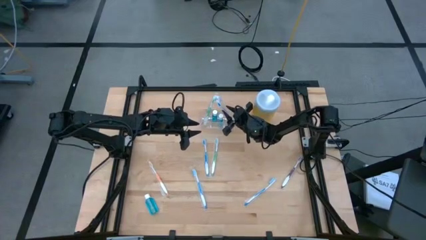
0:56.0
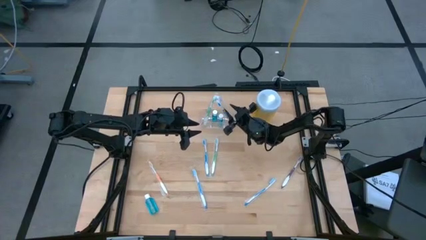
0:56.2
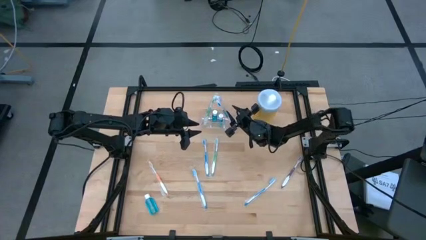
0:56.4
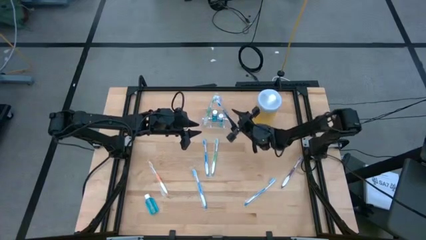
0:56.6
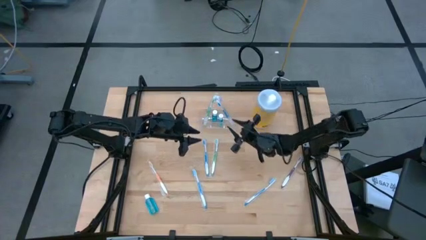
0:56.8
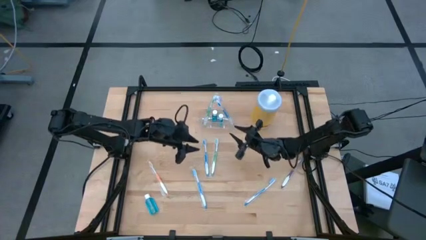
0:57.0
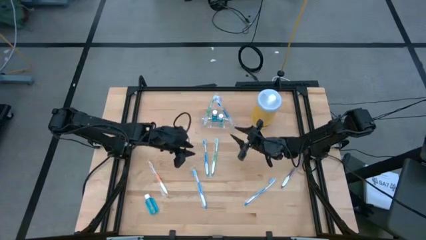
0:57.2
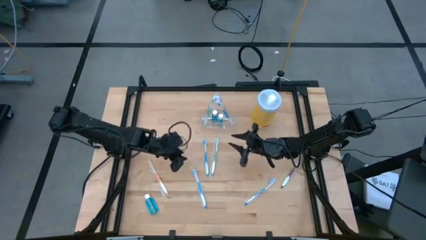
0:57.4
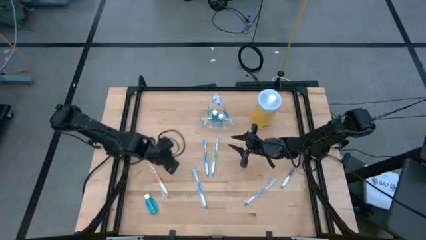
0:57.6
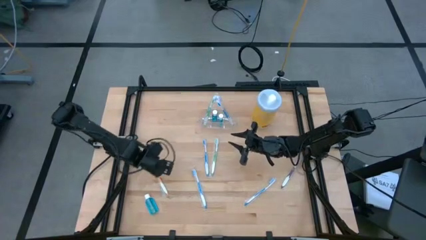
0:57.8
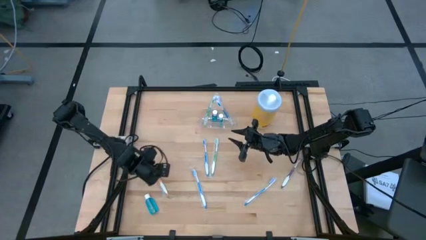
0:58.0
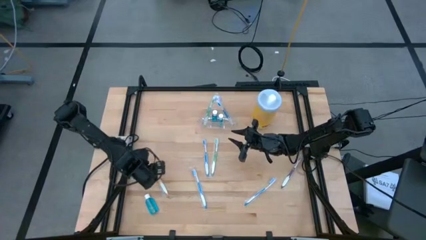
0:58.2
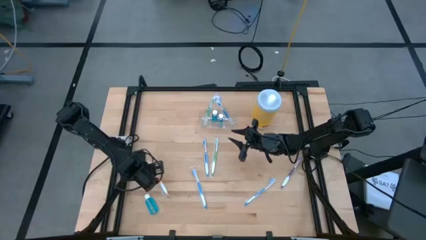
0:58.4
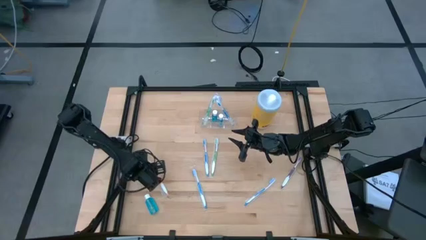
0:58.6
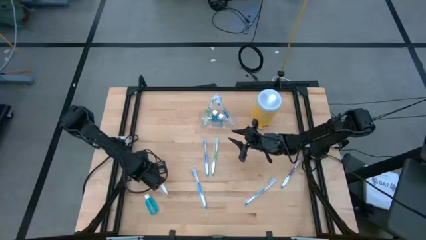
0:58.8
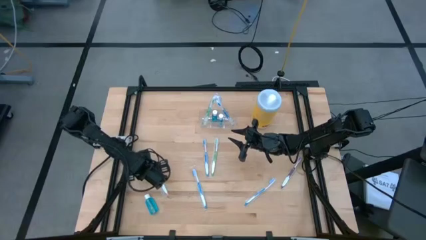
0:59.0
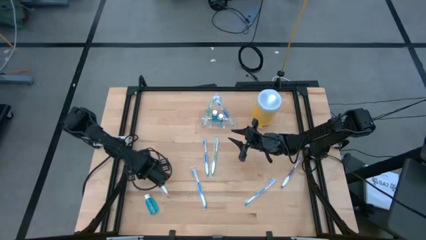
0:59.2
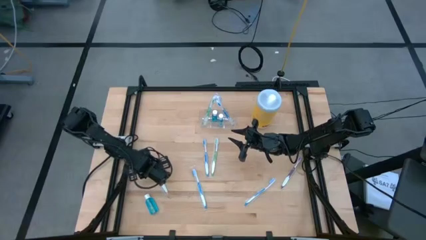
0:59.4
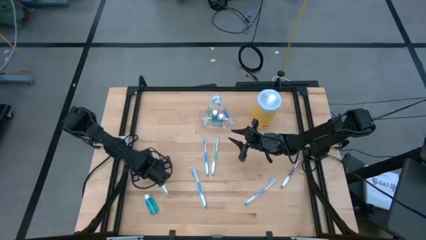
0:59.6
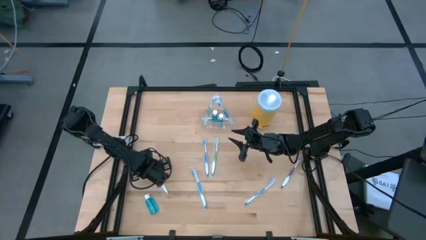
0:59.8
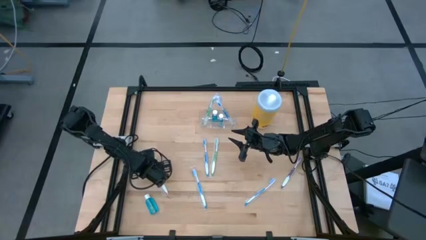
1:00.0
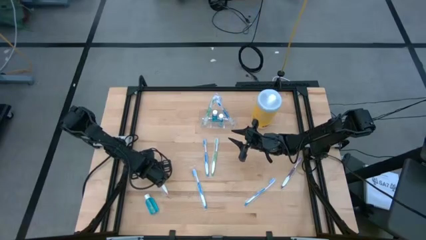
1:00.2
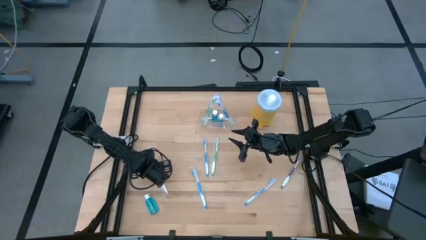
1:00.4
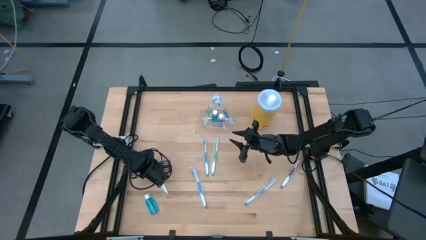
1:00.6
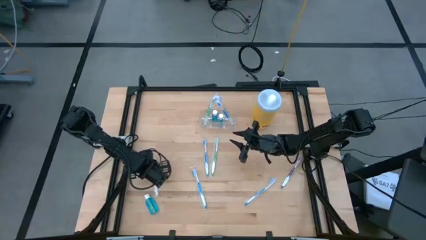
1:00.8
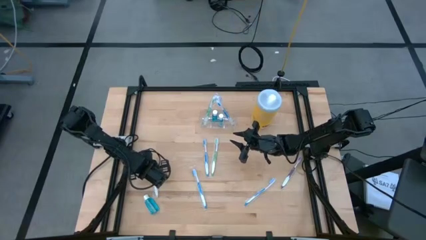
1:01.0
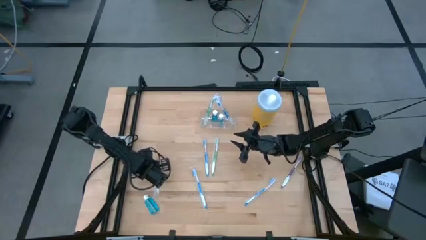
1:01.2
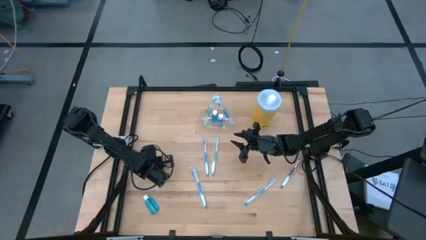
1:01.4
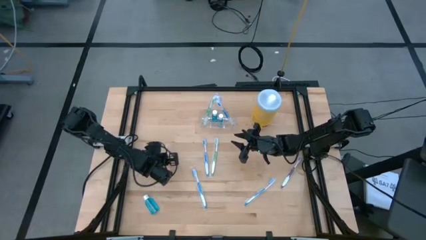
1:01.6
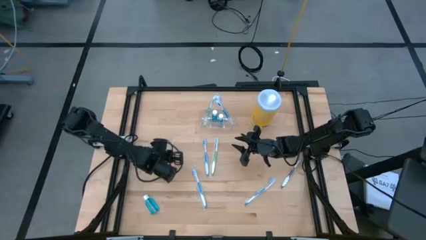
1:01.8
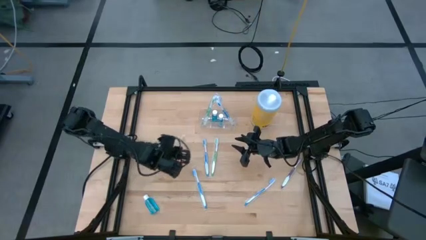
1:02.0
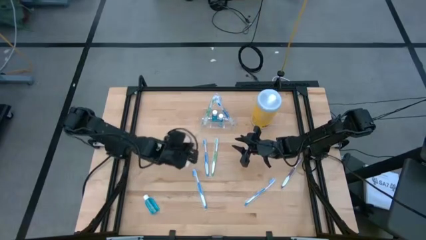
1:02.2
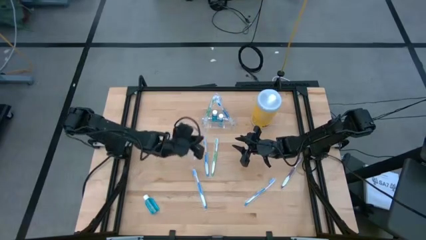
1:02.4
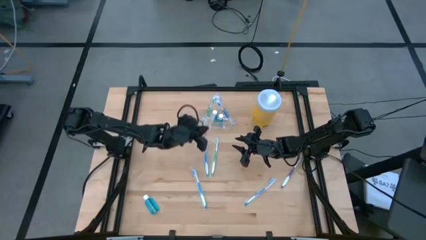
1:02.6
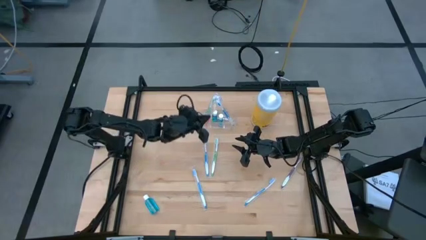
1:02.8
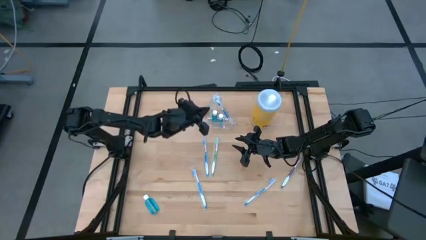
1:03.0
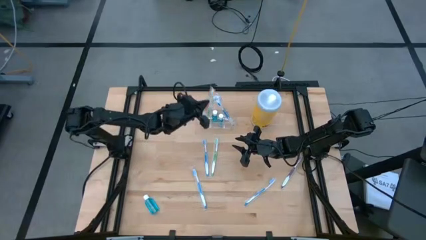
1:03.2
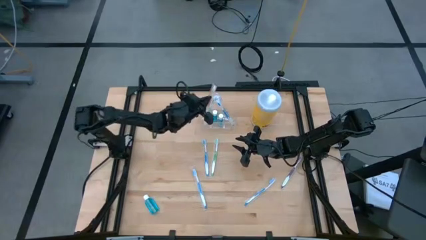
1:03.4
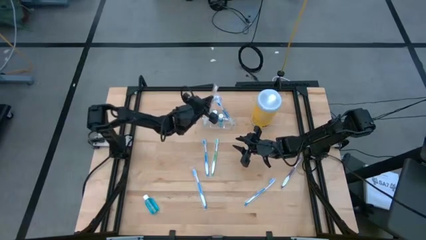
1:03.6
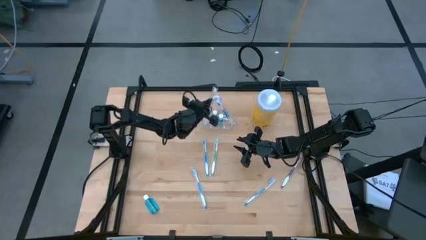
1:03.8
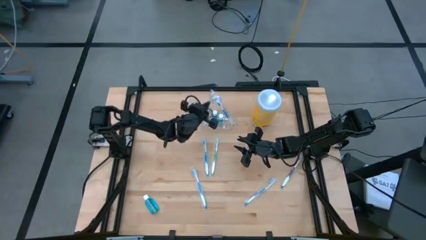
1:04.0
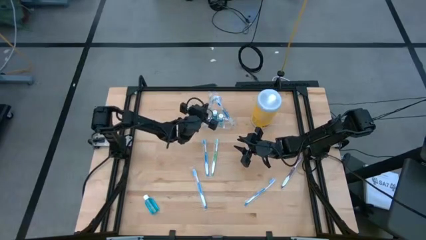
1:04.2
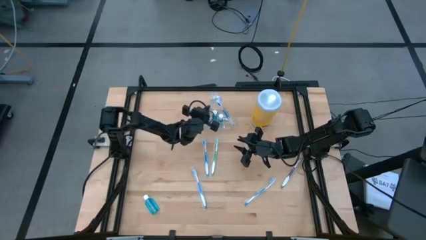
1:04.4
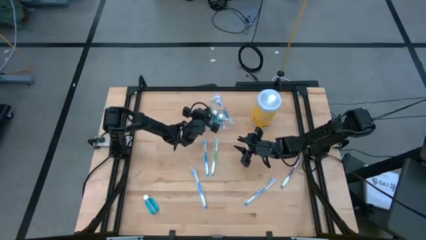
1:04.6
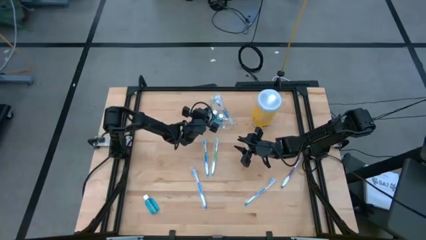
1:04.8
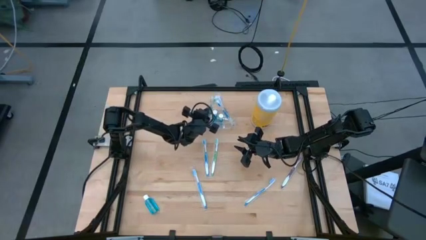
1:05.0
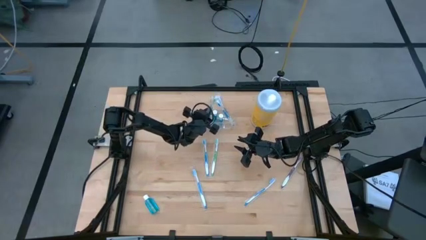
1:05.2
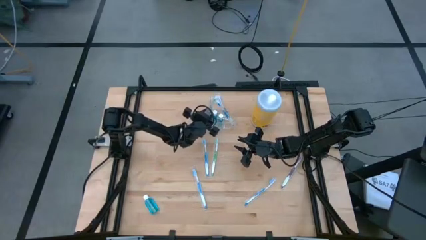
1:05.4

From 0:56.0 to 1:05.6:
Task: Pick & Place toothbrushing station
Put the orange toothbrush into the left compartment of the transparent organizer

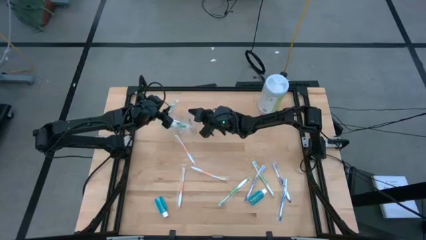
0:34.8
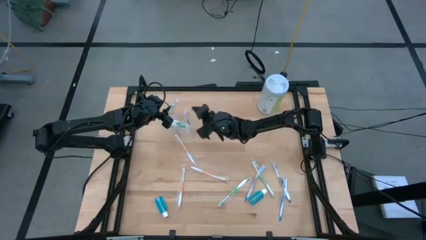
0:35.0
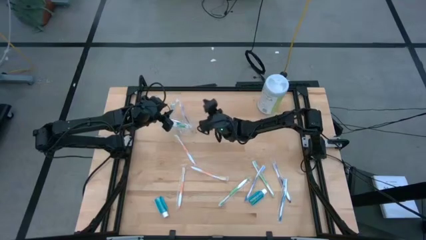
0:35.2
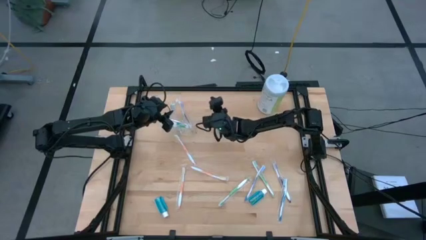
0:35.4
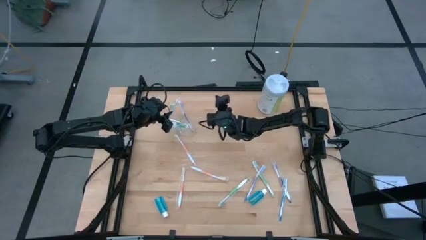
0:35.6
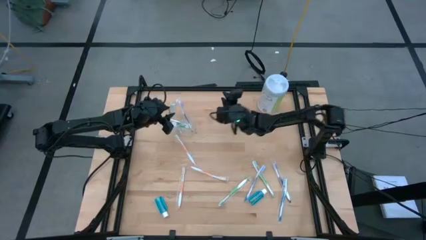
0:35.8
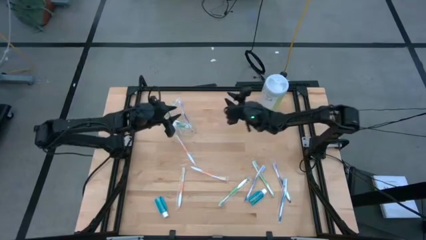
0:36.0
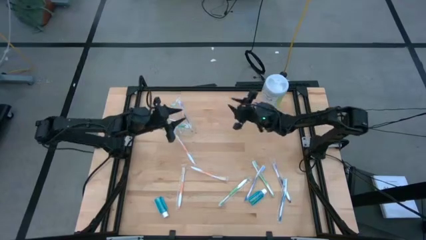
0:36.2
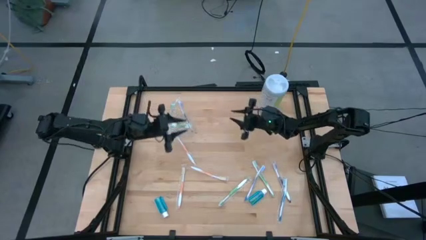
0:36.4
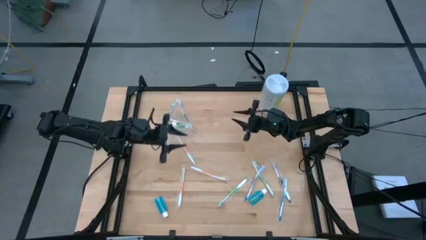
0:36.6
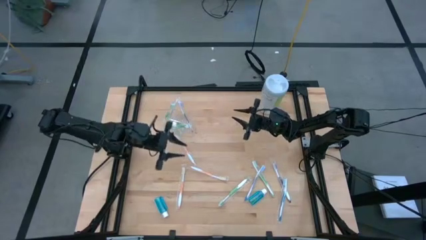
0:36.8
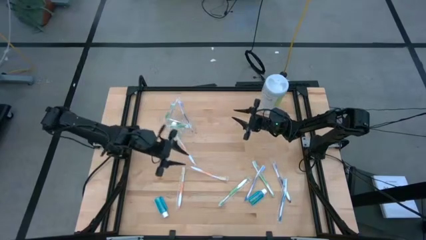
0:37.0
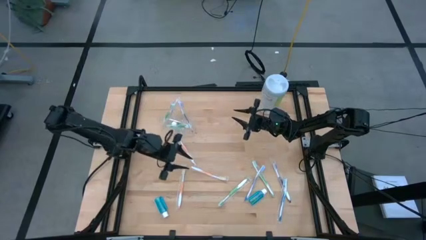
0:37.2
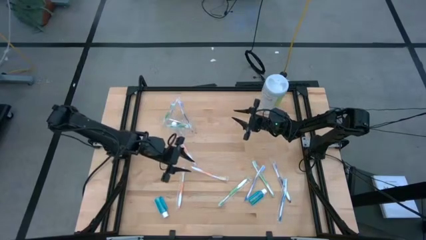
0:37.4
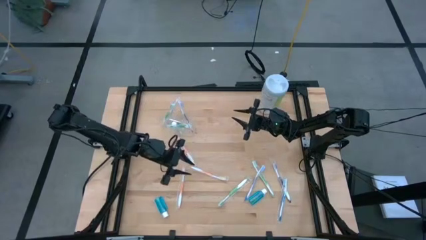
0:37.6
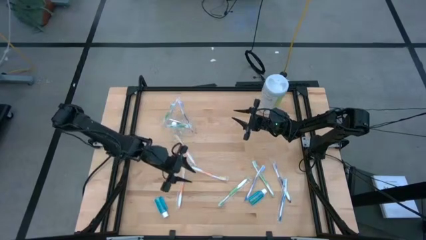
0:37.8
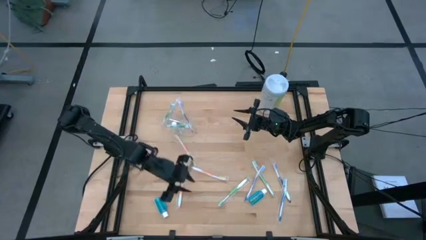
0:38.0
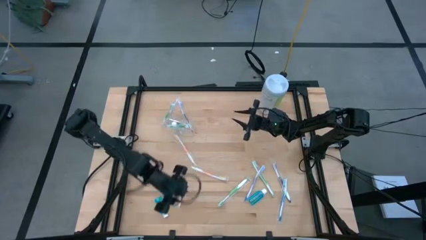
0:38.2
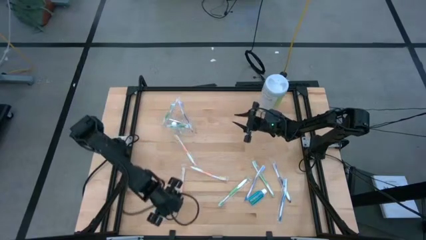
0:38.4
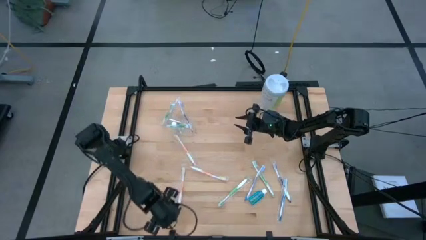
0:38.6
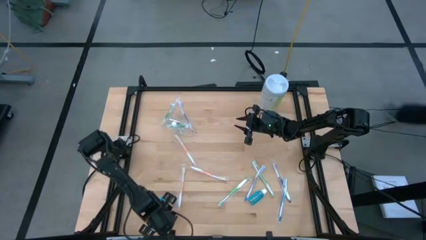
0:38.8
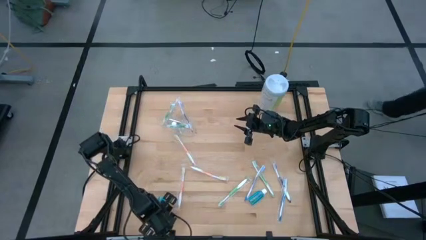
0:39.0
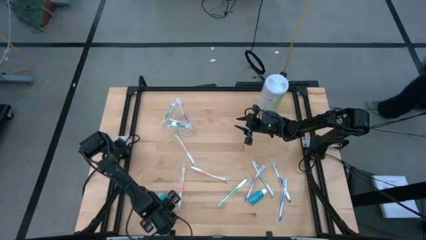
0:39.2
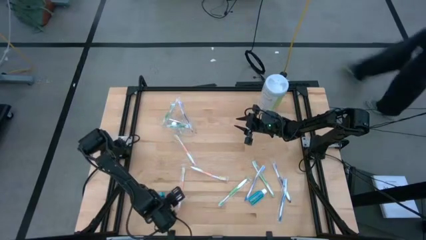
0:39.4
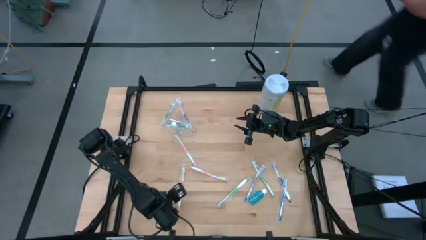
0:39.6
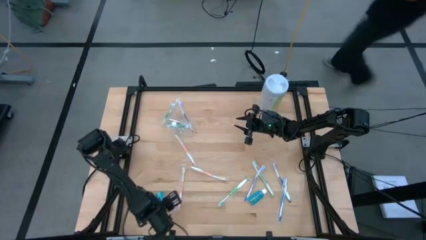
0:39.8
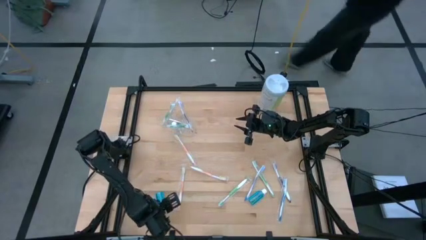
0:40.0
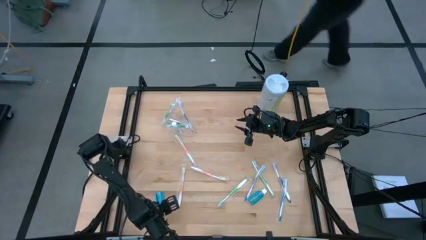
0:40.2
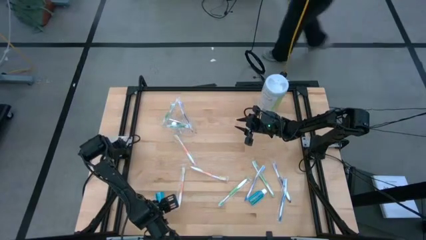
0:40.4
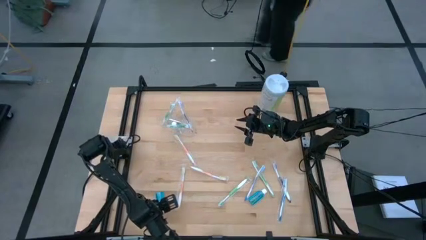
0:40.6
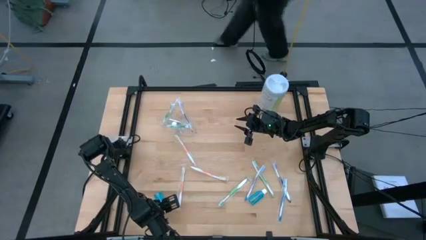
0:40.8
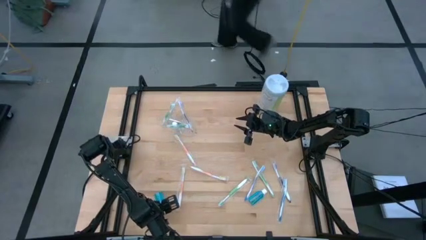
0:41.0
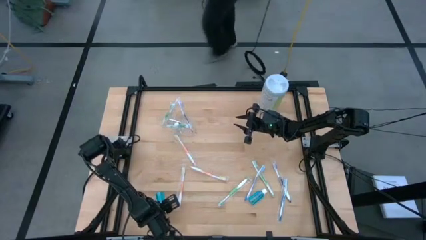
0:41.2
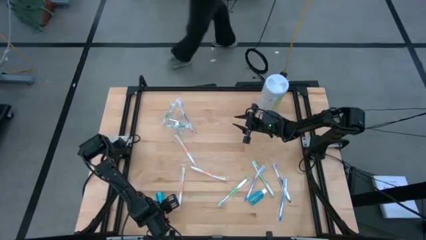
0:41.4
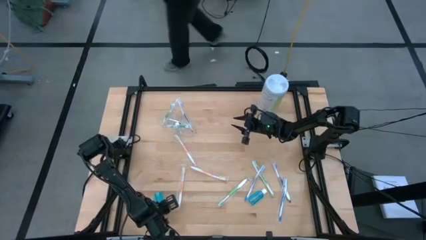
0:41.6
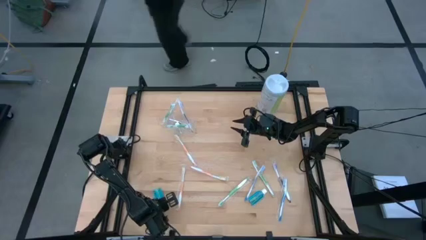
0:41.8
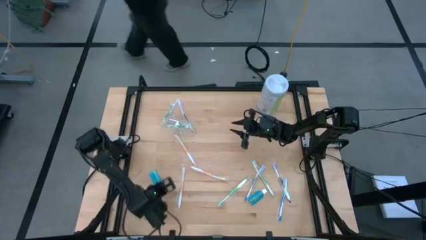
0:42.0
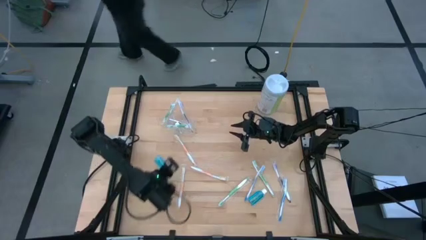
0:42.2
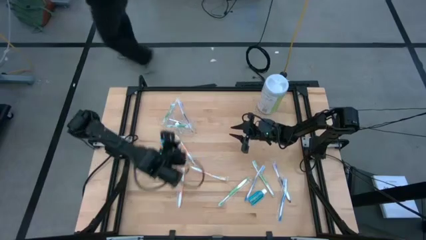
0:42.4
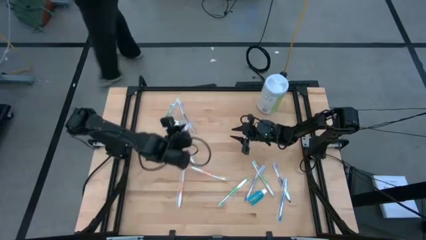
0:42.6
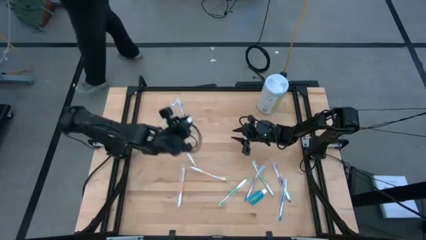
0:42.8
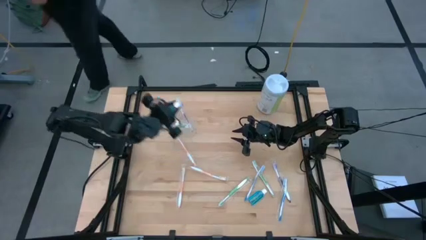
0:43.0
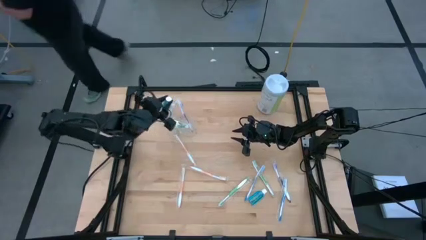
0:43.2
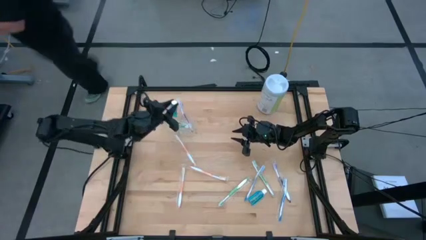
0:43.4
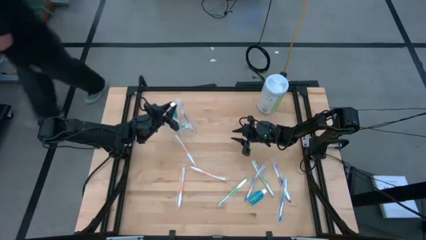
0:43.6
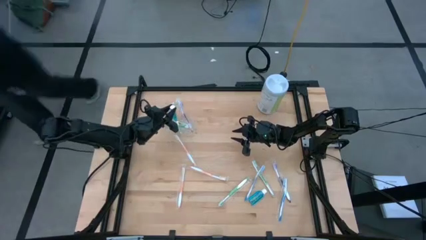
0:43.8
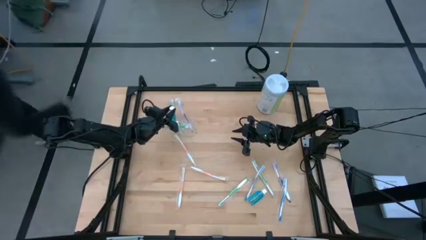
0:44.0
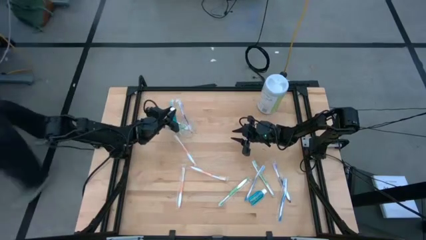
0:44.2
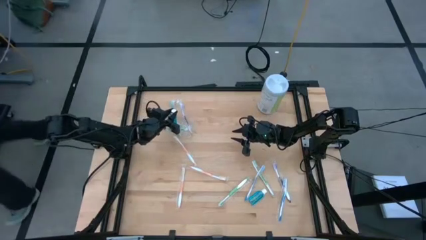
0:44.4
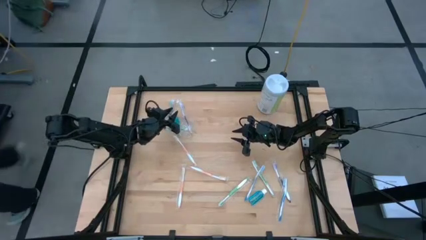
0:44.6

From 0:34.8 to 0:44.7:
Task: Pick & Place toothbrushing station
Put the blue mouthwash into the transparent organizer
